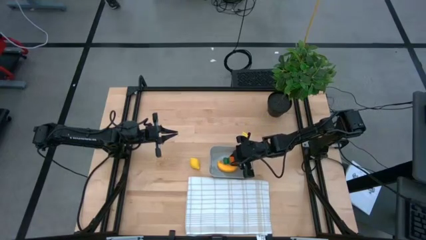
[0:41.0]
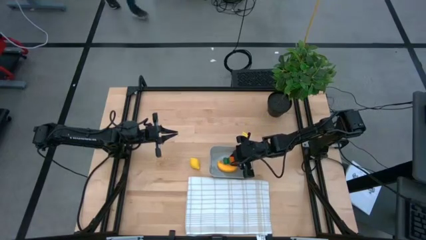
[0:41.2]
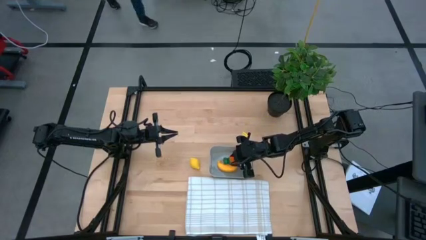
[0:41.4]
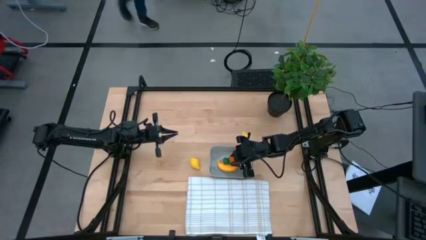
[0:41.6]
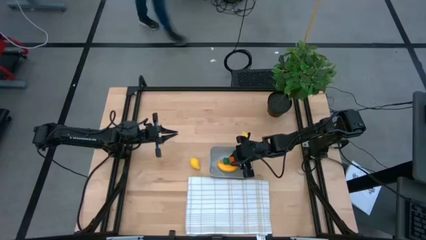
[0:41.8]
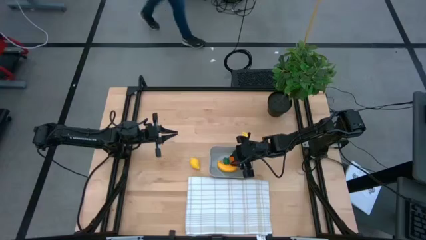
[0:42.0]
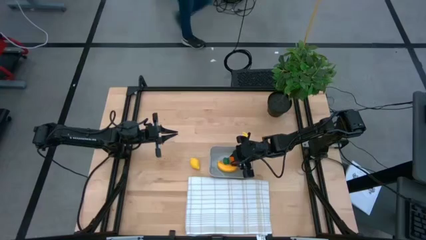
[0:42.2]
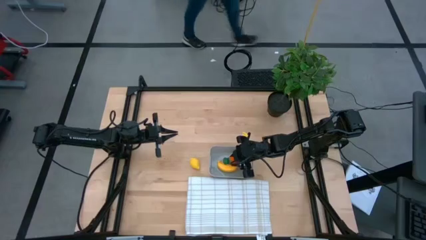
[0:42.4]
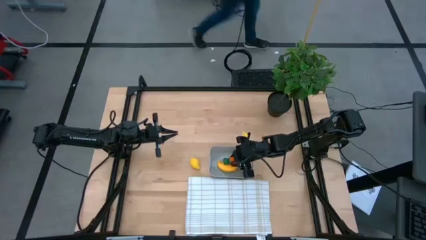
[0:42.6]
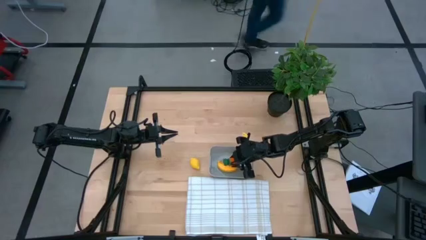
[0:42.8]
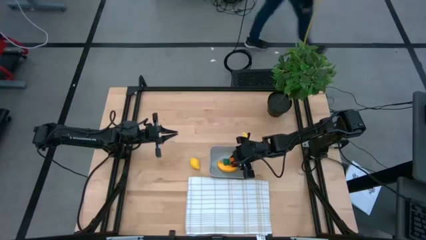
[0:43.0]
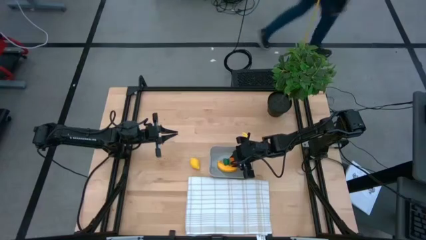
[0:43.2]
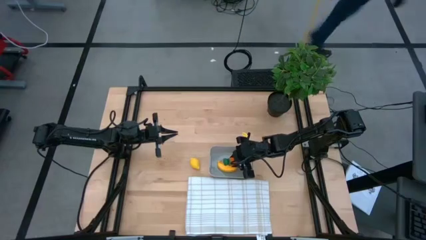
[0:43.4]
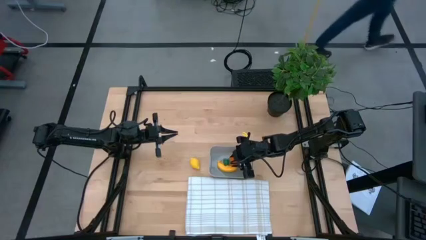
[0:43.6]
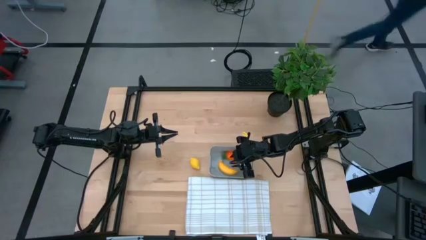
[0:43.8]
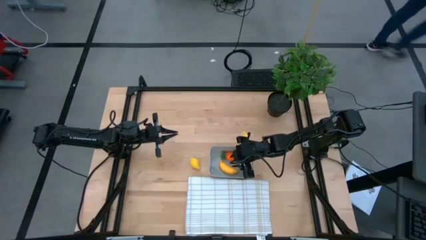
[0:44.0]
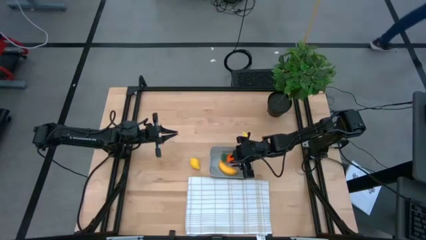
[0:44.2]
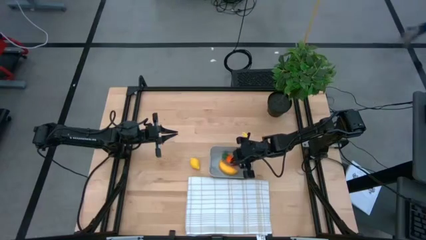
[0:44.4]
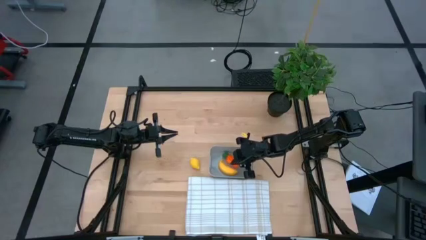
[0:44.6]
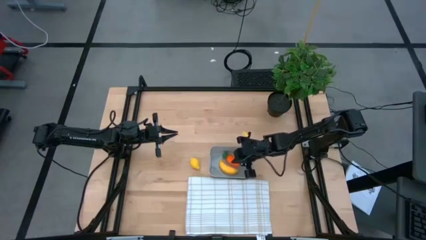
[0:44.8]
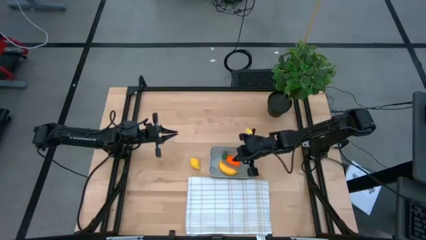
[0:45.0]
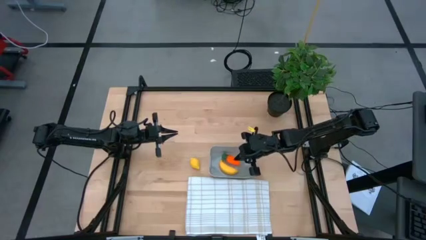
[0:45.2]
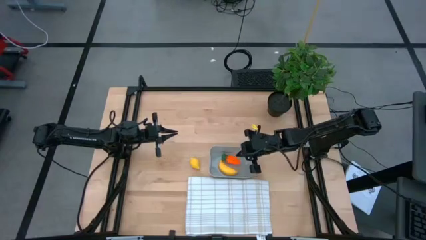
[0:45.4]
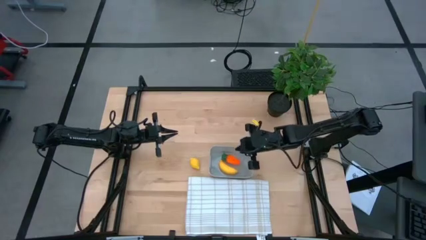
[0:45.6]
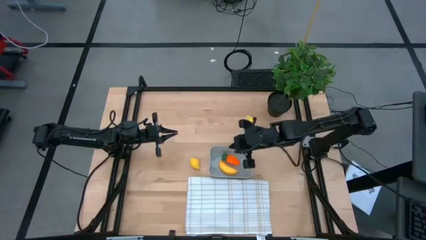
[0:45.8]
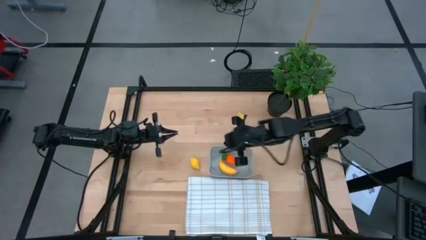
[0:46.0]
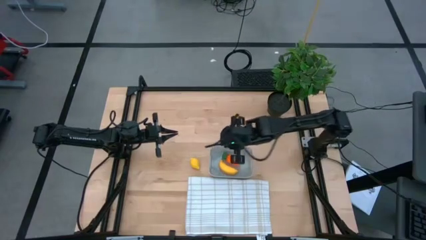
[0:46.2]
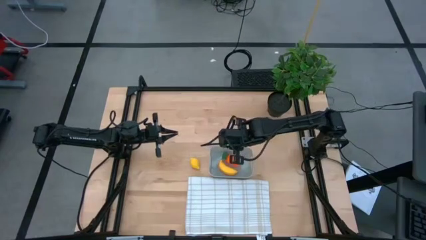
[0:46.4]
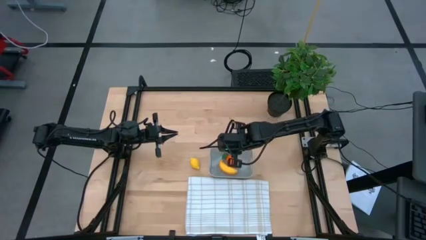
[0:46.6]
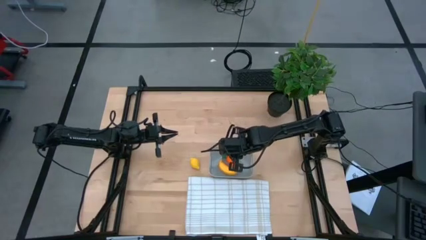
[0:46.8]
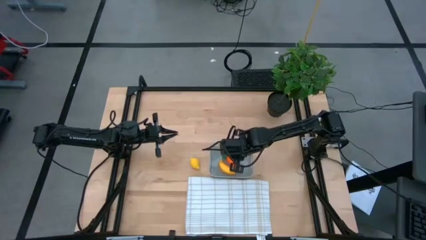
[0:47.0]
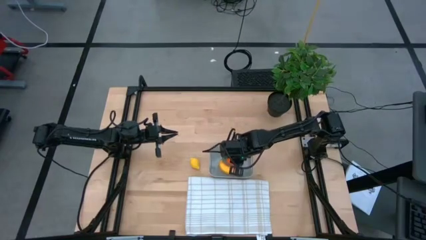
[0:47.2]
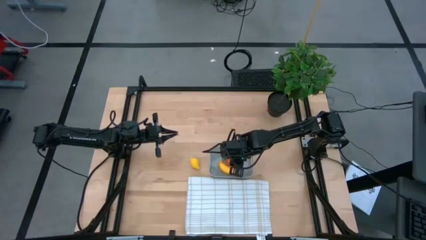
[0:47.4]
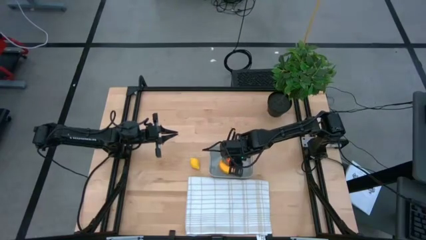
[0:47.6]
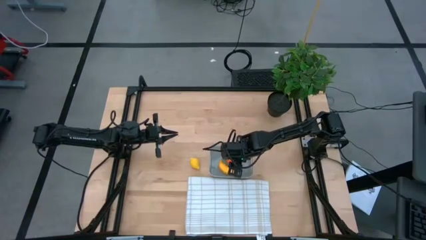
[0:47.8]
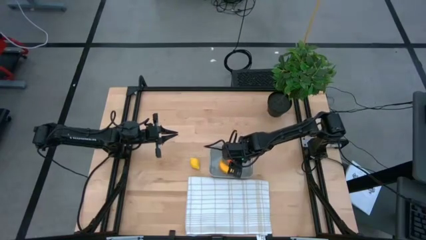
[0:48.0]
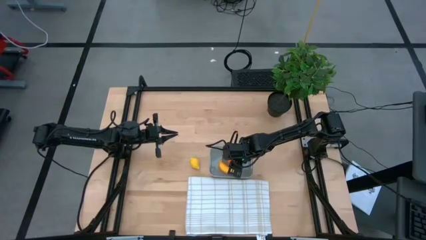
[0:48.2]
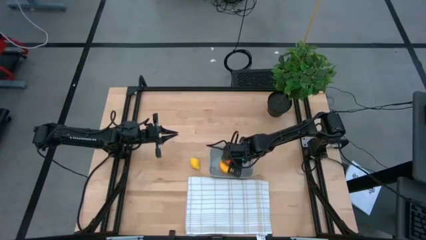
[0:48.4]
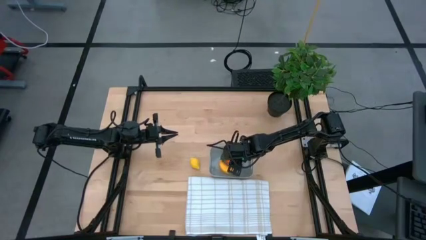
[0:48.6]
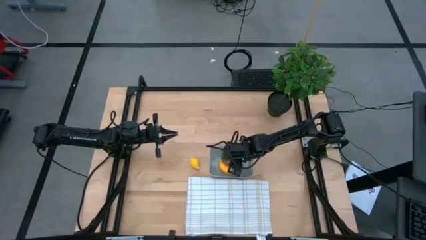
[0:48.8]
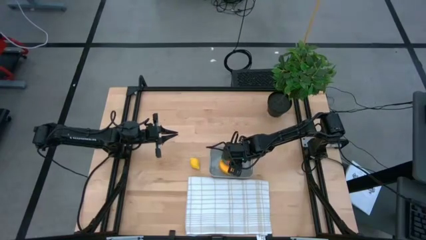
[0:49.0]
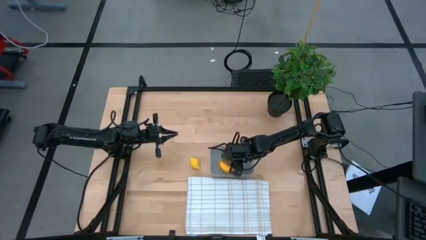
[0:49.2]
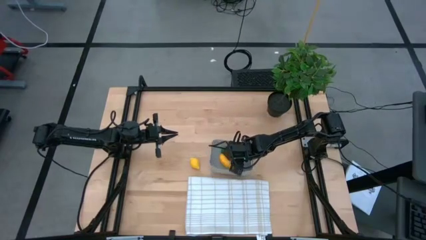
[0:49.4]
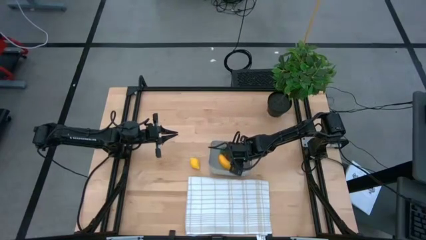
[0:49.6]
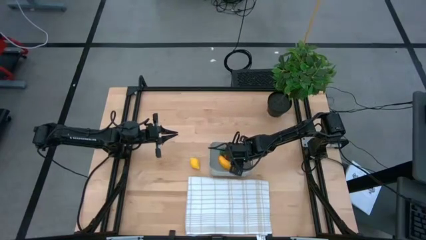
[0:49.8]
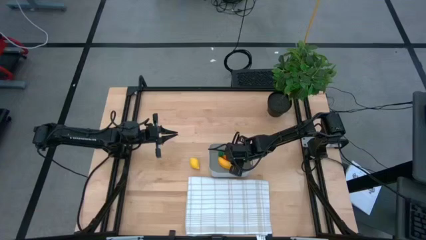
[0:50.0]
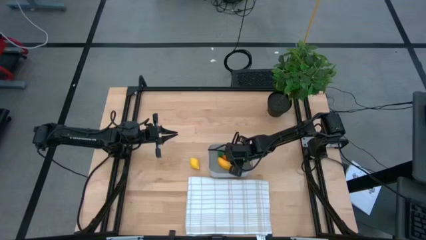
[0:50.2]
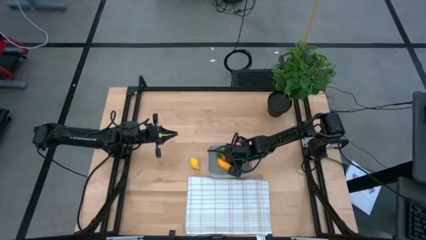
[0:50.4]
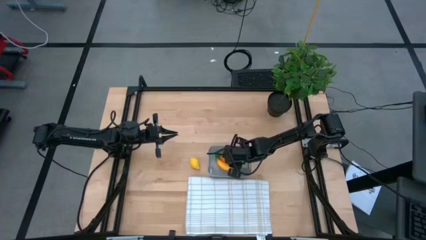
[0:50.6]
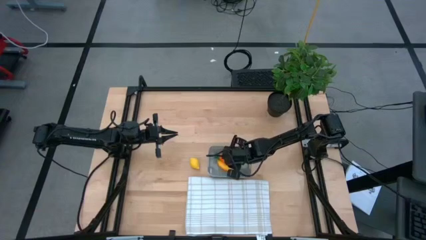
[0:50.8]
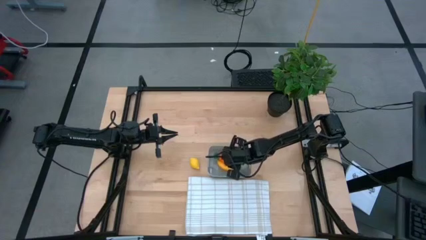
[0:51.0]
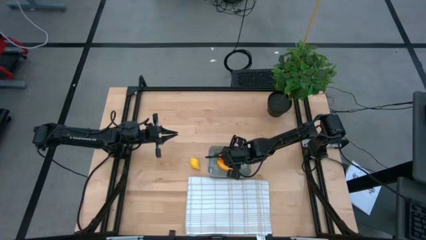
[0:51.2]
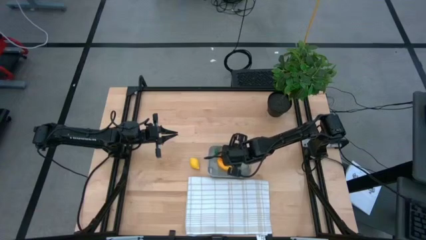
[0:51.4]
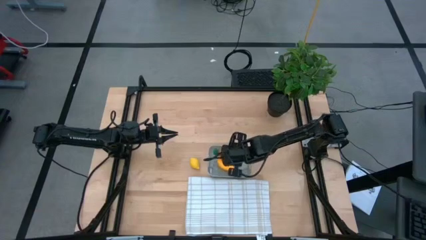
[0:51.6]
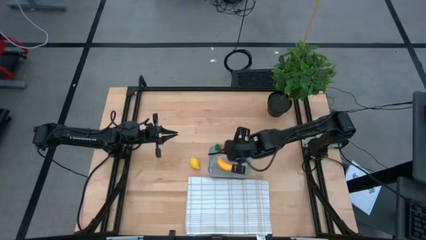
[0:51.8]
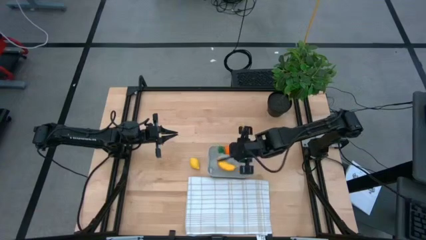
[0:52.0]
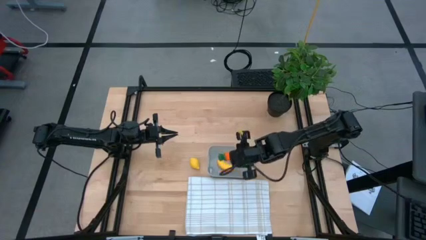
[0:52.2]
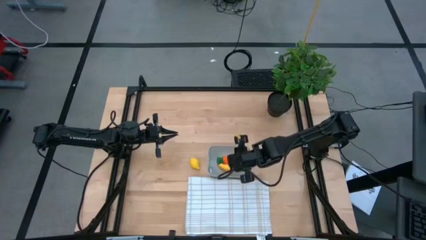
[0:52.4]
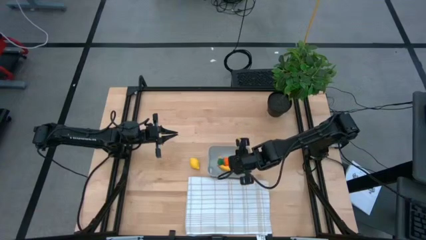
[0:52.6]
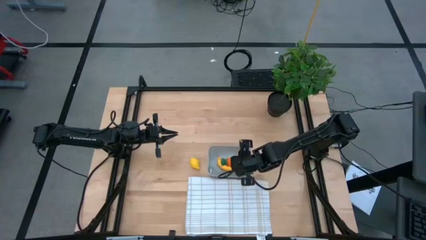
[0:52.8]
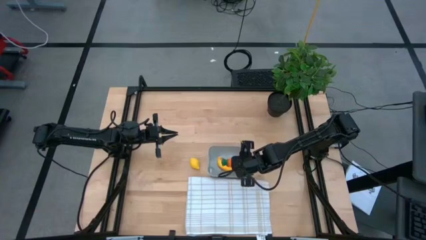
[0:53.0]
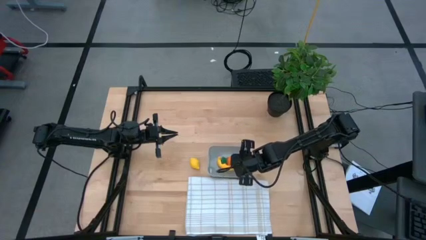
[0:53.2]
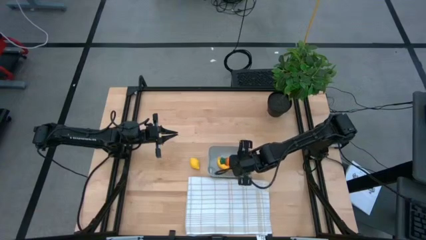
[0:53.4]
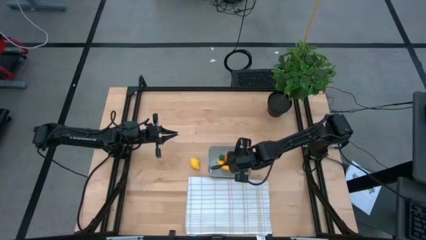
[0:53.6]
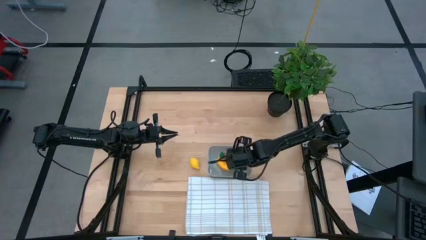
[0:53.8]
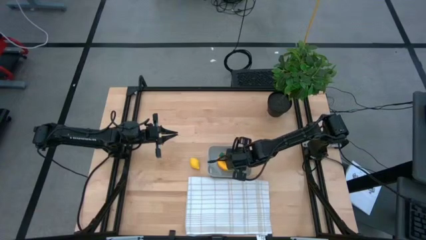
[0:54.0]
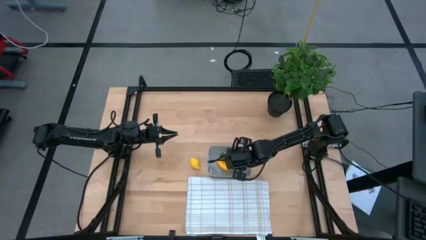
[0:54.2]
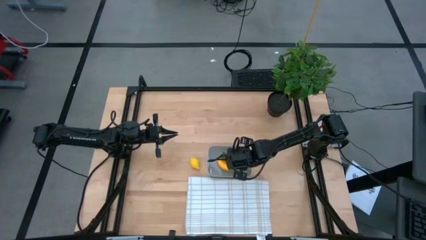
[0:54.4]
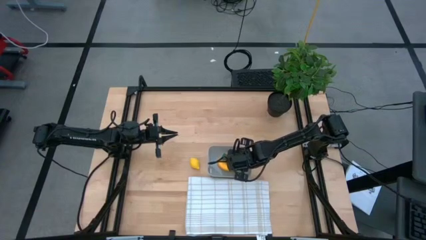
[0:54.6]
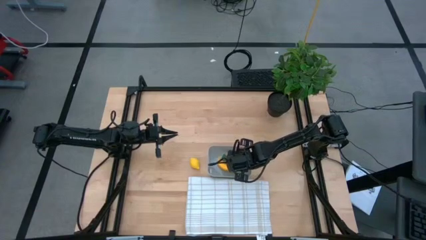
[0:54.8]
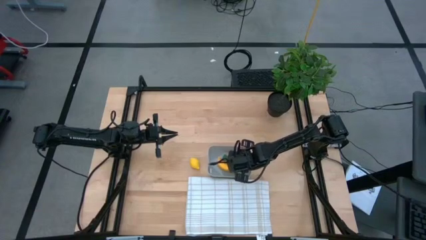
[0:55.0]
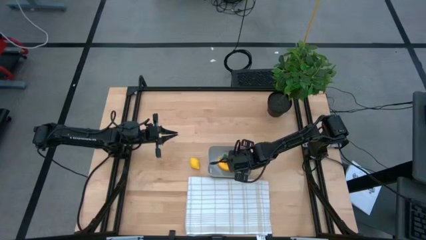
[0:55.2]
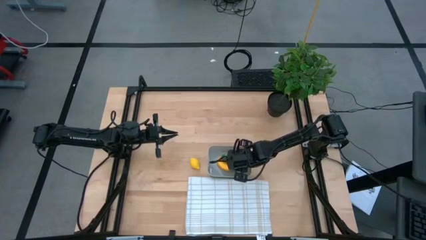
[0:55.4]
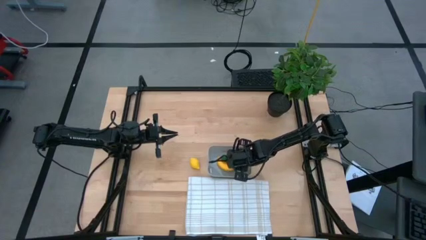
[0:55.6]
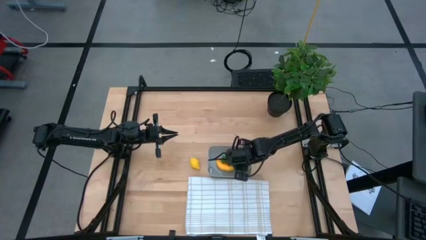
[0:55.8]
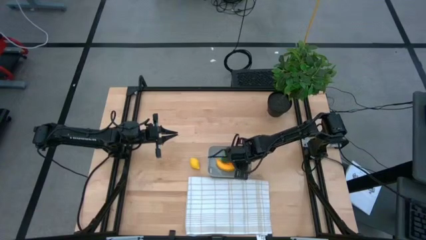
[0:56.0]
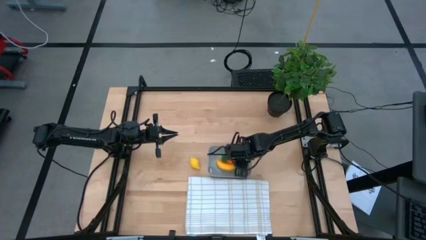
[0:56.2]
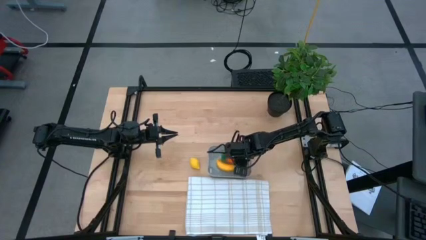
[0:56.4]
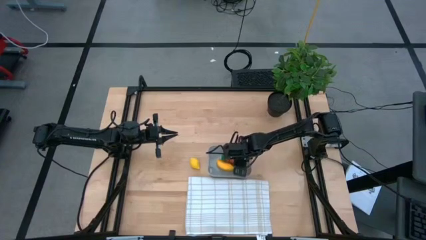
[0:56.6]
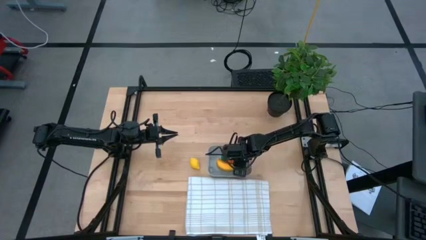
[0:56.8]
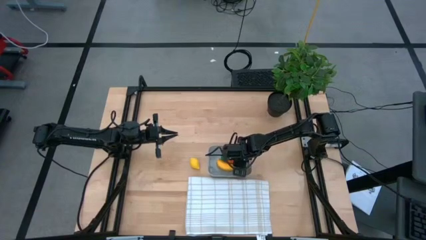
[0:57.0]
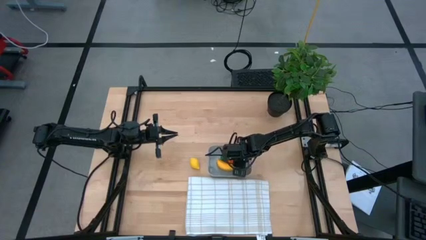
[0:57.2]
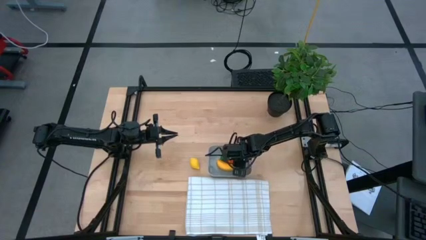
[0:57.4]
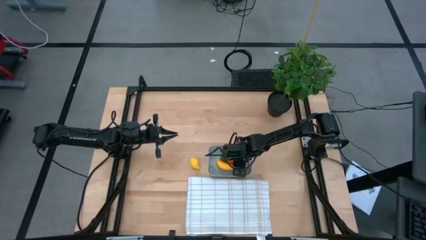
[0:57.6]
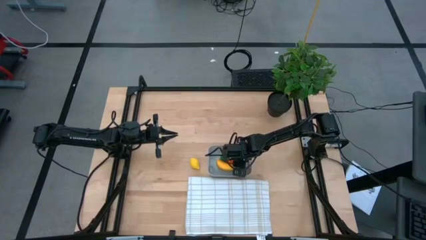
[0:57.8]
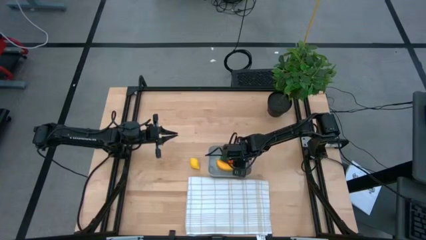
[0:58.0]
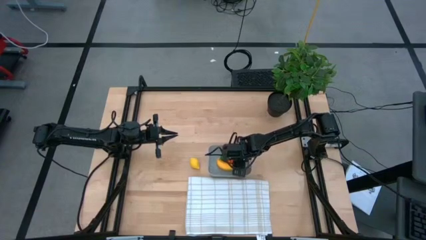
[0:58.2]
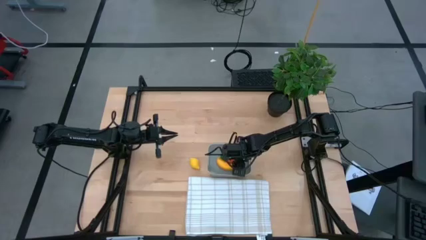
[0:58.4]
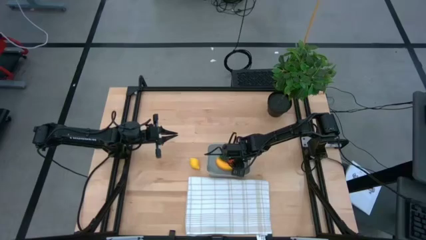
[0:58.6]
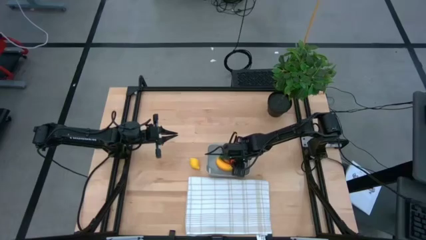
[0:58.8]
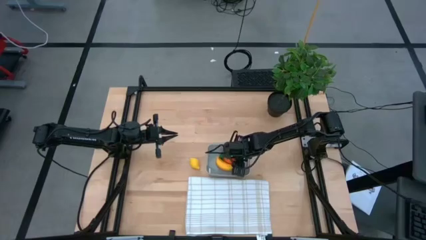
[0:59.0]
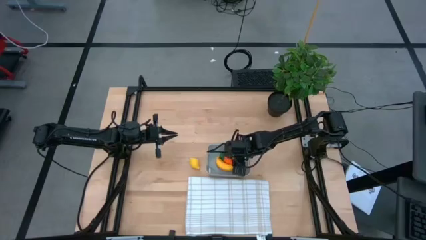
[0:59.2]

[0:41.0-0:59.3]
Task: Pick and placing Produce into tupperware
Put the orange carrot into the gray bin
